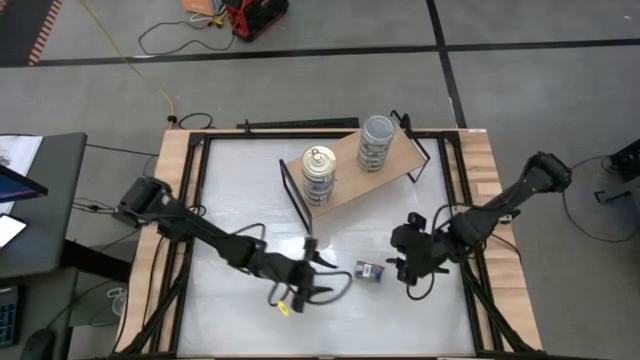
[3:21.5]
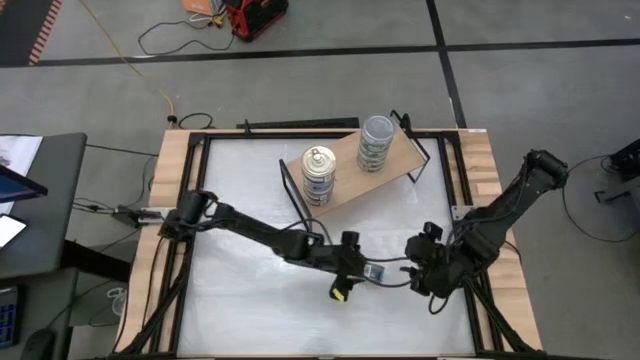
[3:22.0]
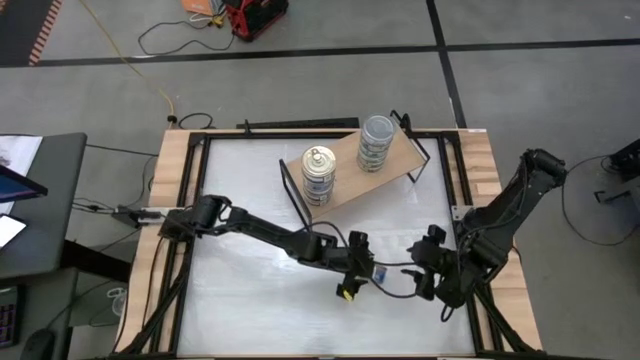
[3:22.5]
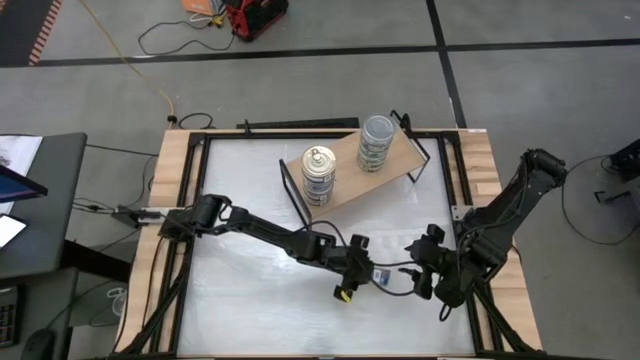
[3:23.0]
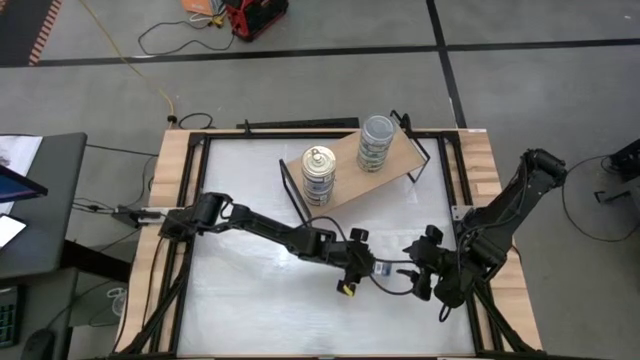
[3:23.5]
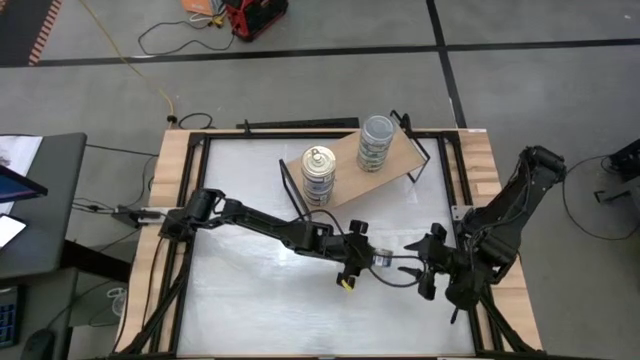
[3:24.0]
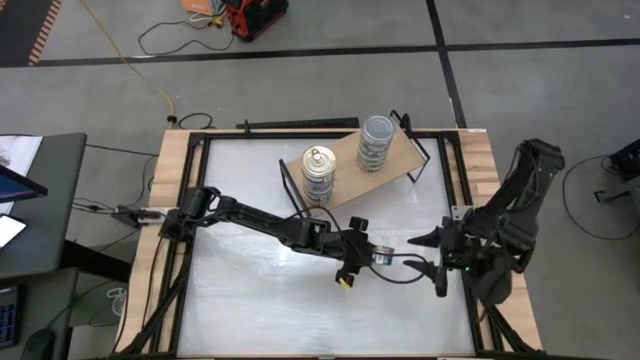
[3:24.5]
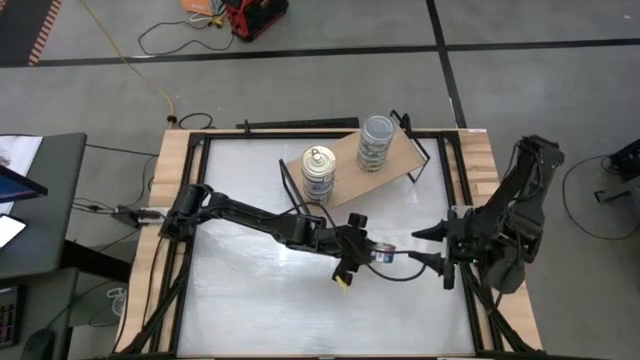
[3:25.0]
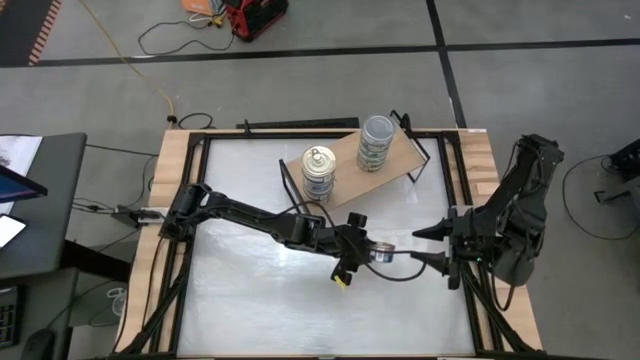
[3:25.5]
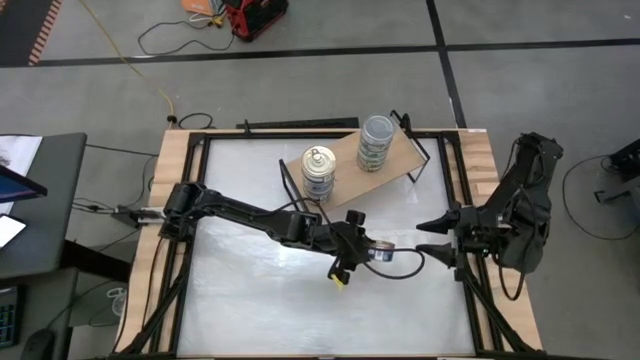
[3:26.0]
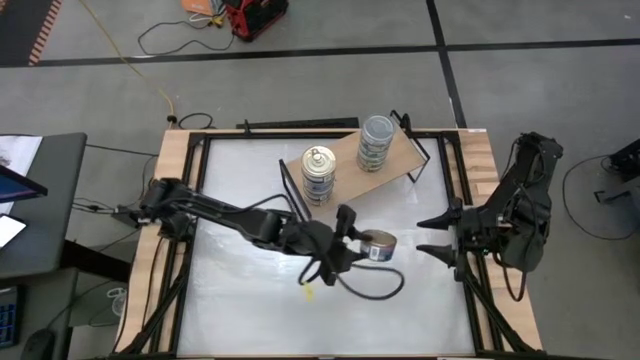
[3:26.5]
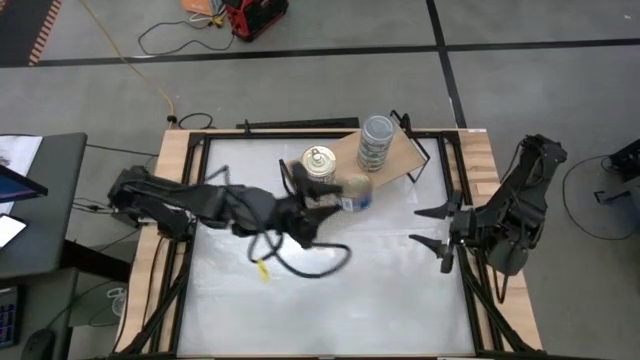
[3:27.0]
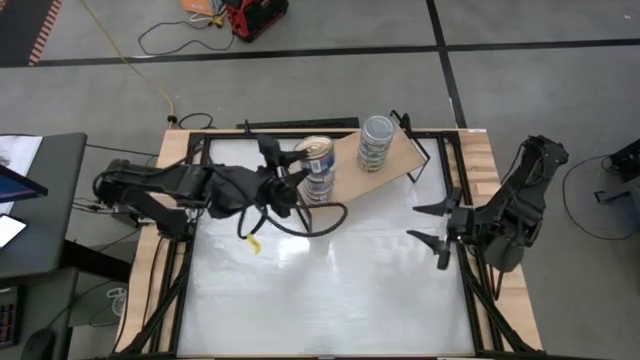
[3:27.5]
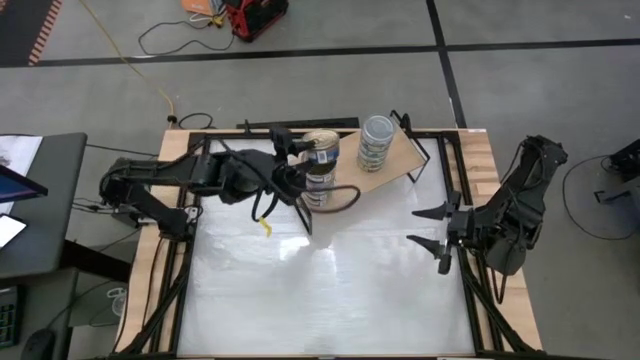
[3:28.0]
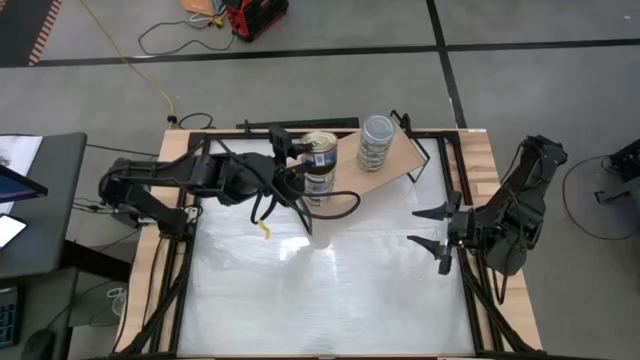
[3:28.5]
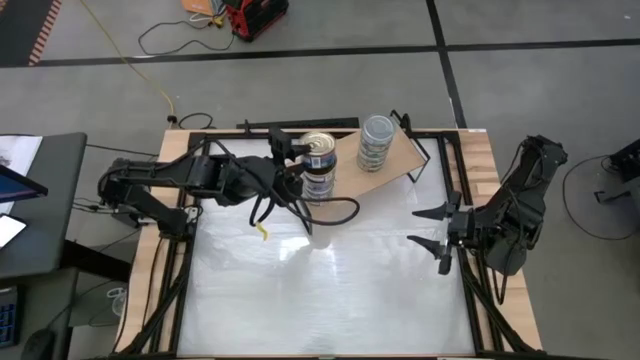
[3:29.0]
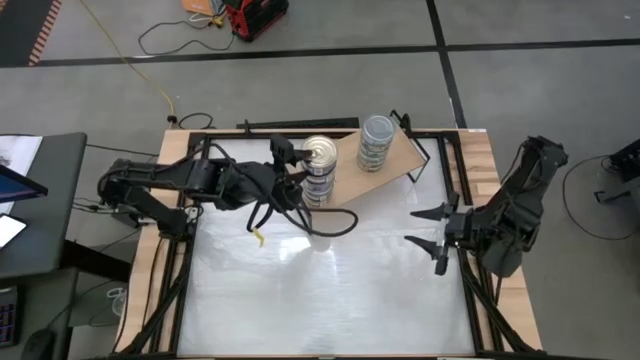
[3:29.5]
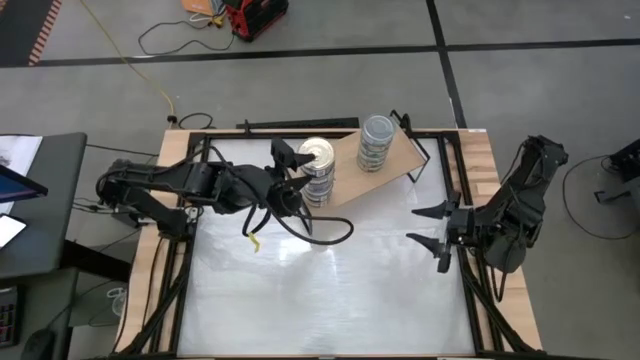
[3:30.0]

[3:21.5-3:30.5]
Task: Stack canned seafood by type on shelf
Stack the blue tuna can on top of the blue tuna can

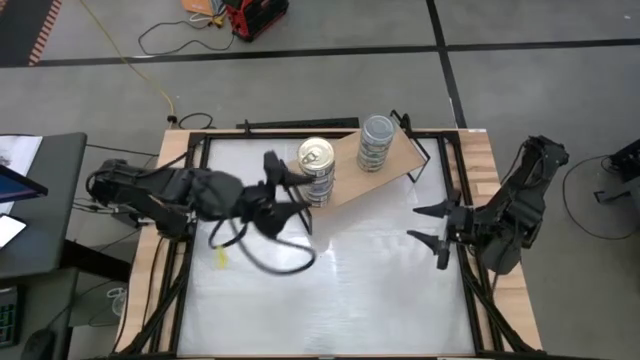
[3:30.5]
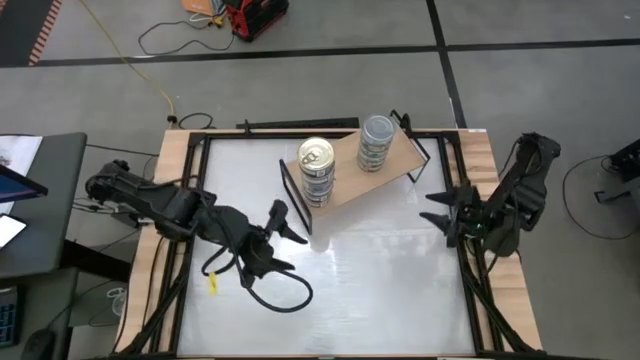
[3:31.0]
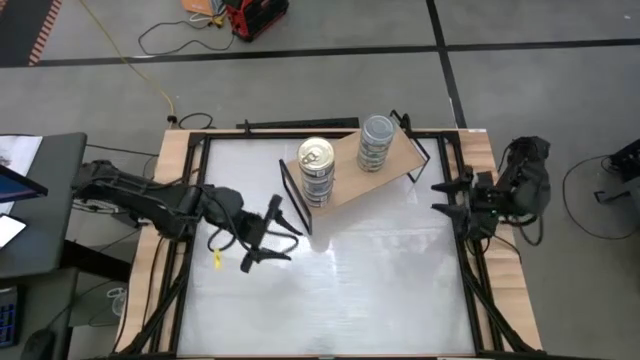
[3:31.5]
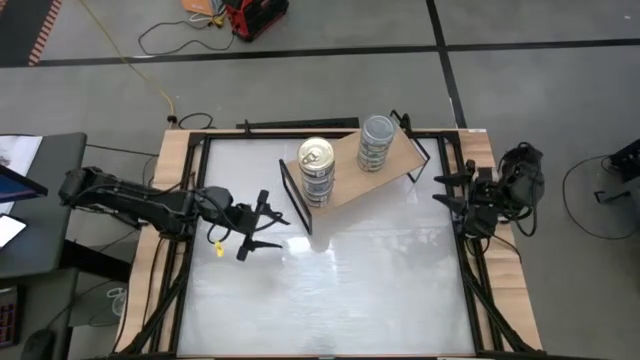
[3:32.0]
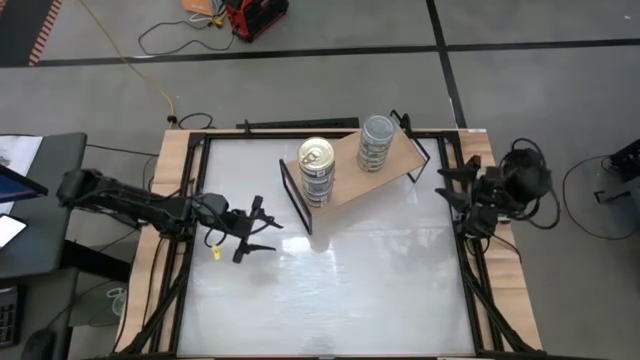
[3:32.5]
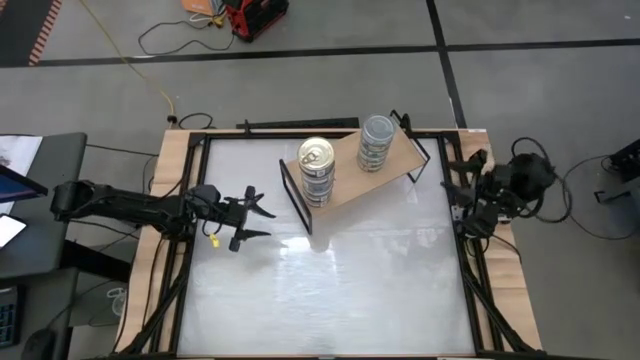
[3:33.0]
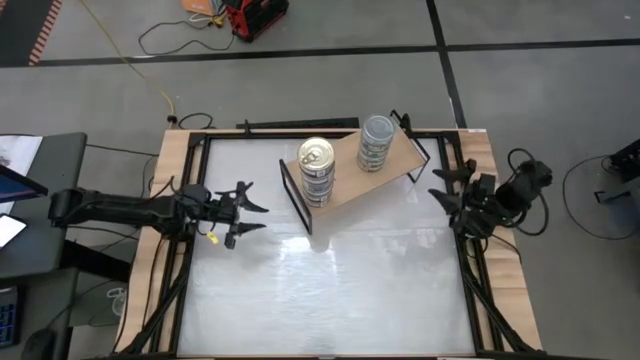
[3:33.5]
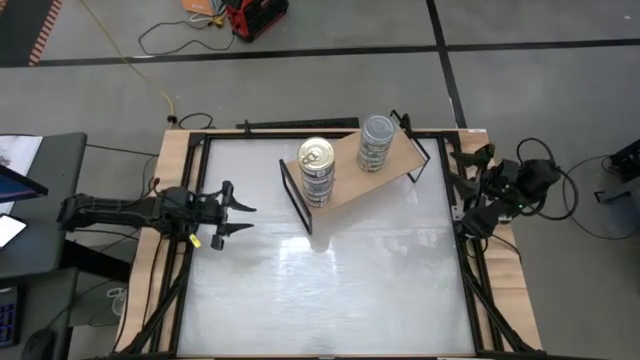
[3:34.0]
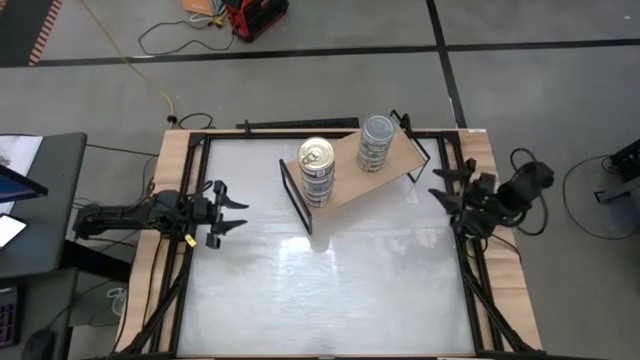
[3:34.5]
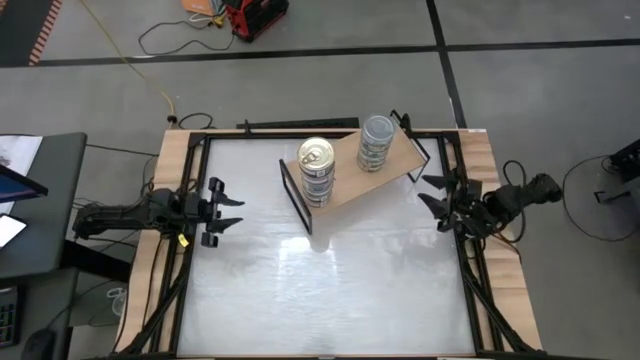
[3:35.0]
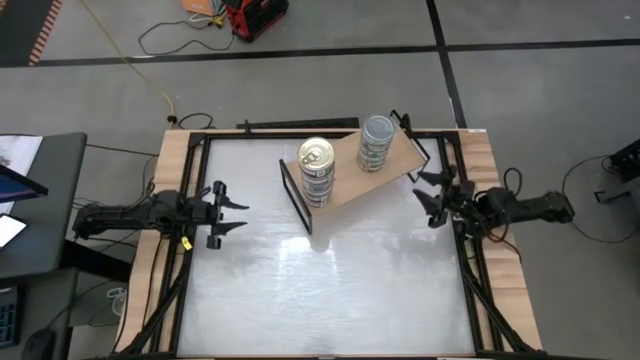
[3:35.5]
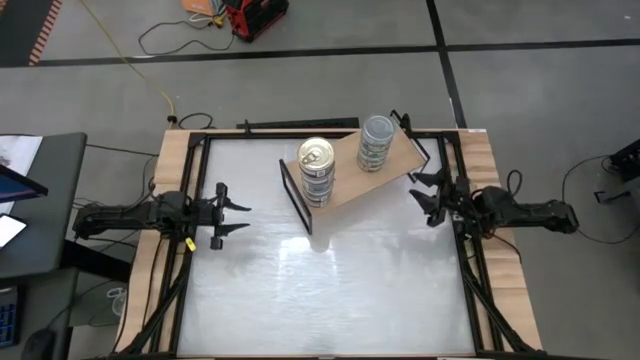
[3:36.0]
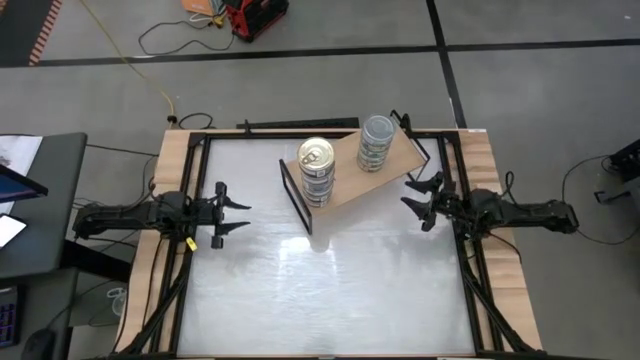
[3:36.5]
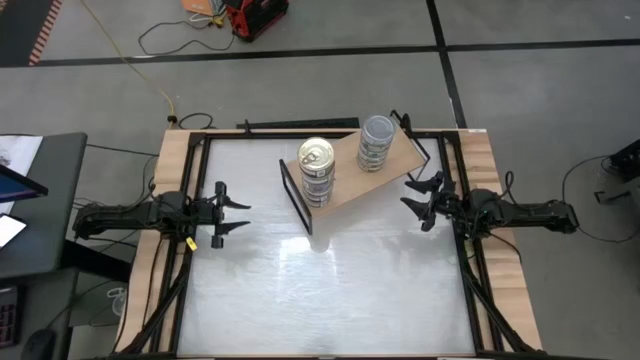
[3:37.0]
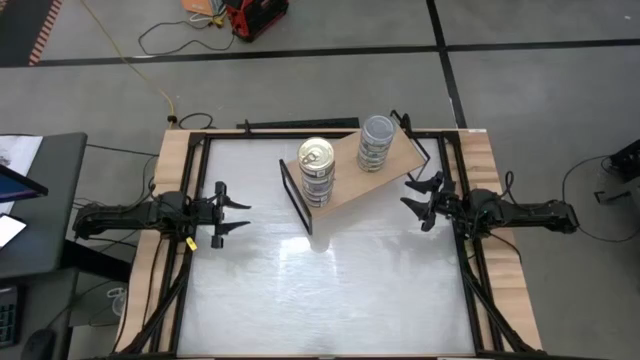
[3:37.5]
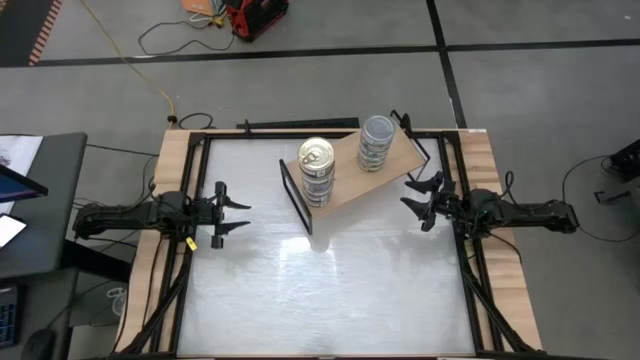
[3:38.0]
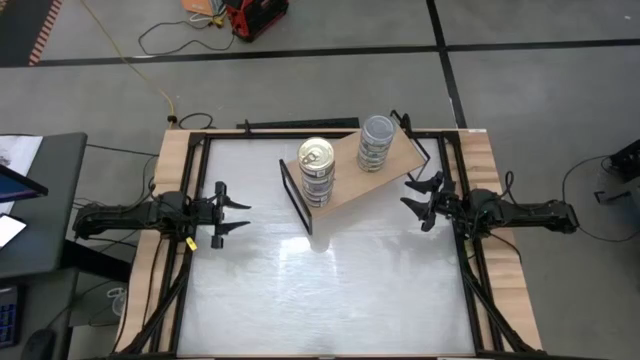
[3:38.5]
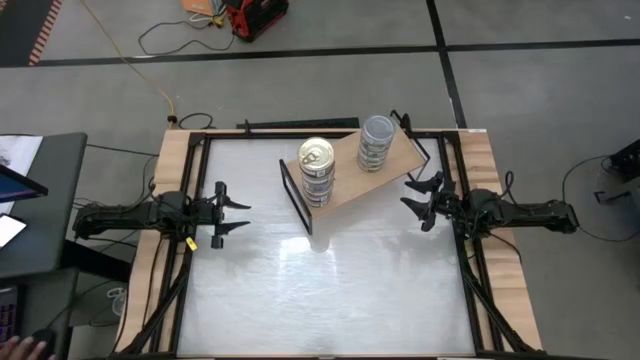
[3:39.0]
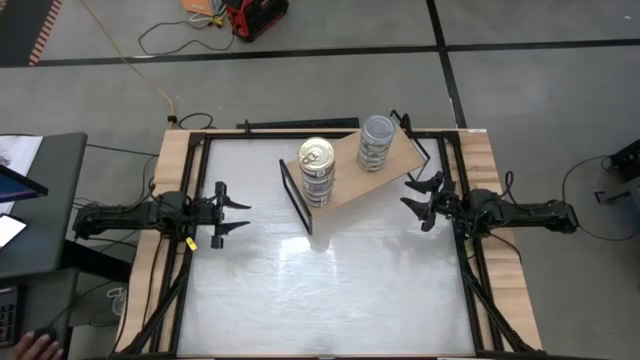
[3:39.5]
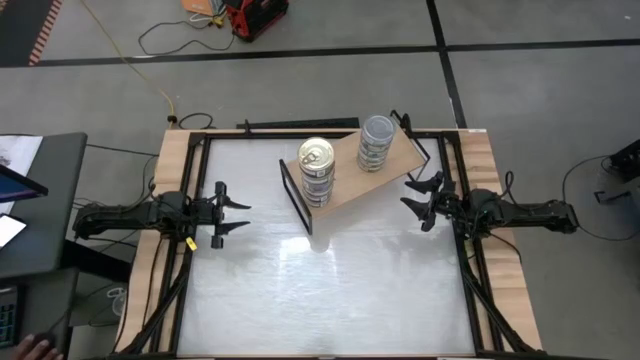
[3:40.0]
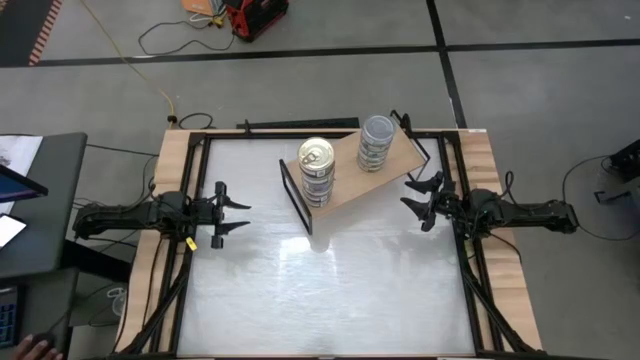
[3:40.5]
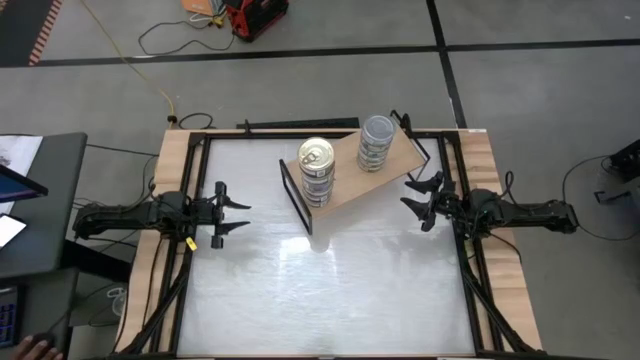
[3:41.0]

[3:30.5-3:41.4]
Return to Home Position

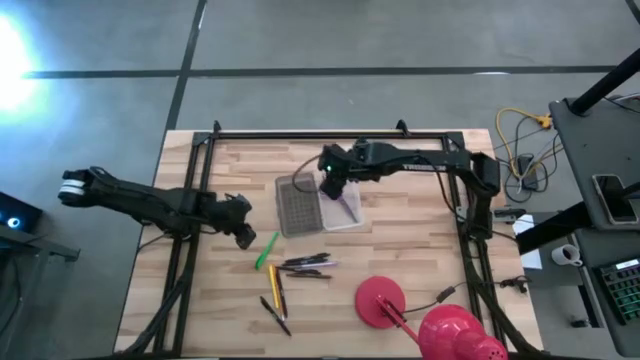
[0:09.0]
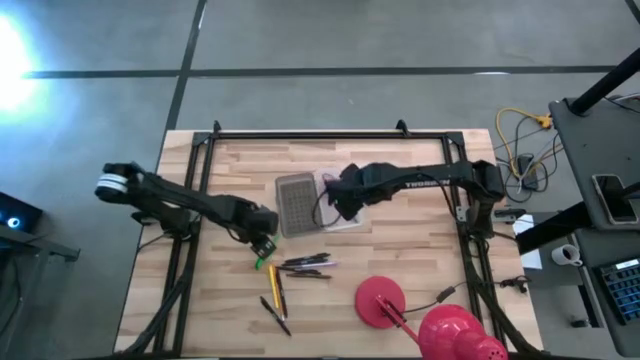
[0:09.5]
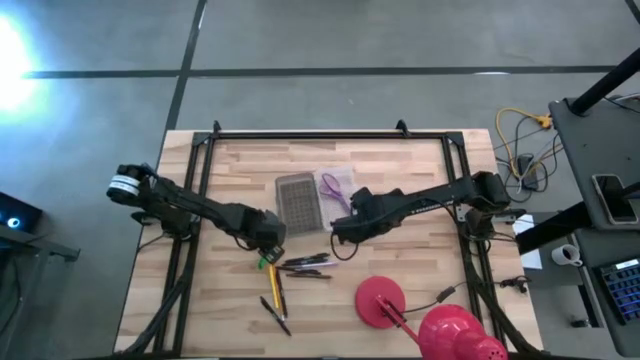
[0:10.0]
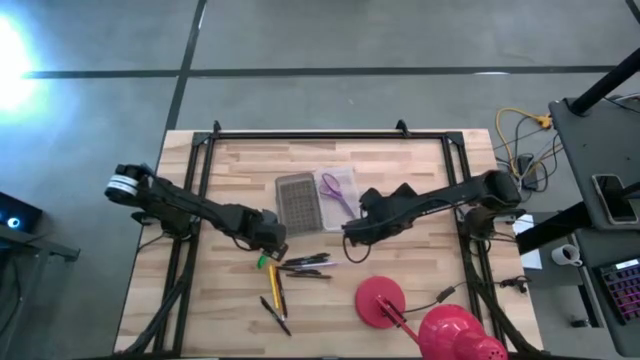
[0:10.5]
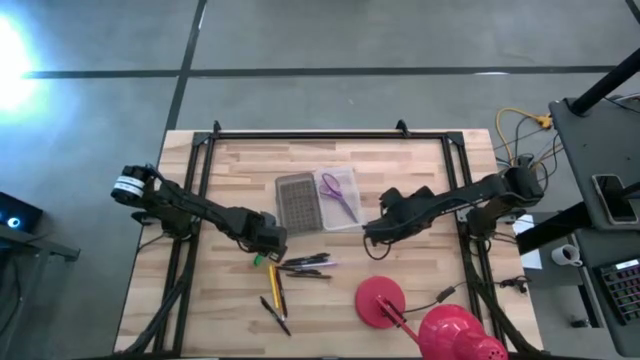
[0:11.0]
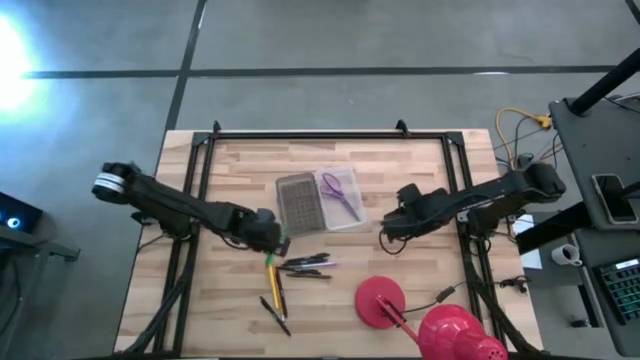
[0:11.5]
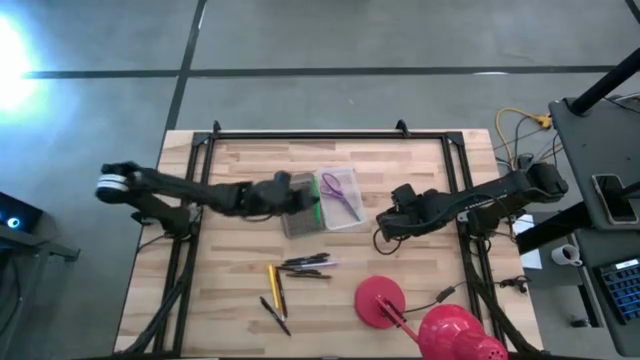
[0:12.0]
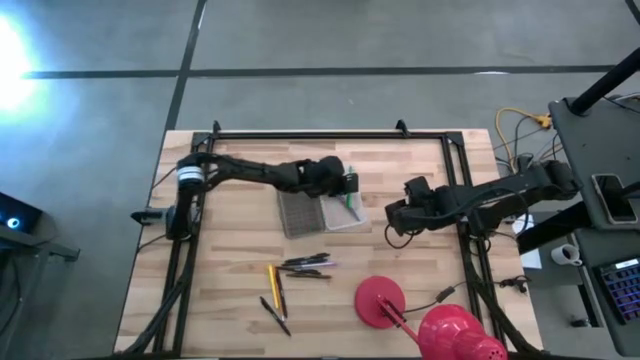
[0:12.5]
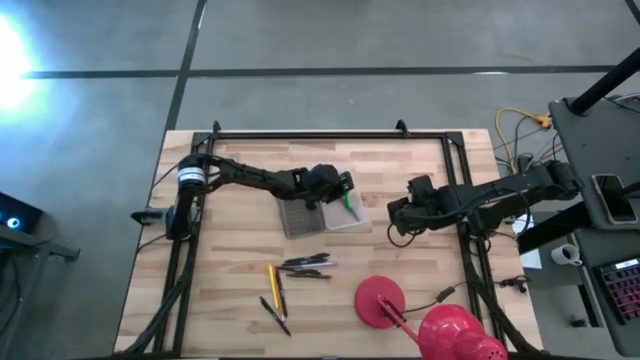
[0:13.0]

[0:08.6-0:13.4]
Task: Pick & place school supplies into a supply box
Put the green pen into the black supply box
